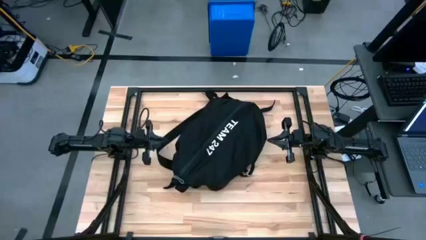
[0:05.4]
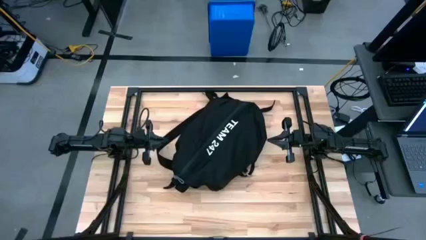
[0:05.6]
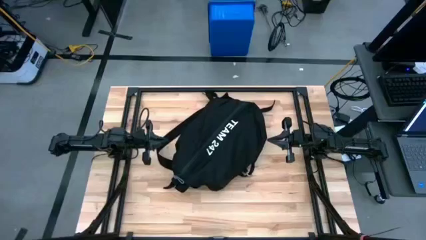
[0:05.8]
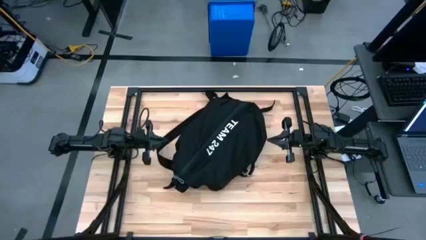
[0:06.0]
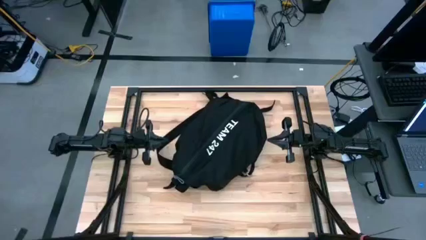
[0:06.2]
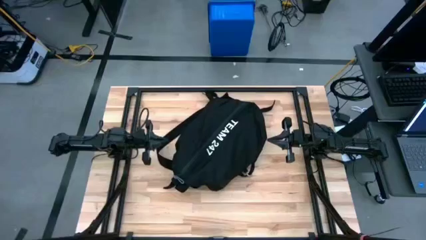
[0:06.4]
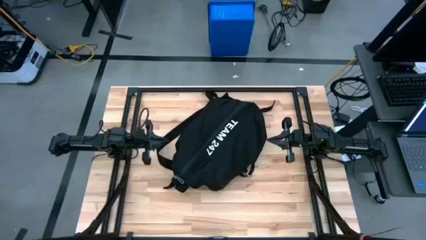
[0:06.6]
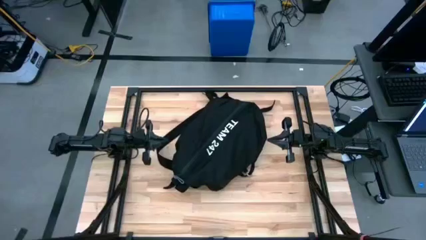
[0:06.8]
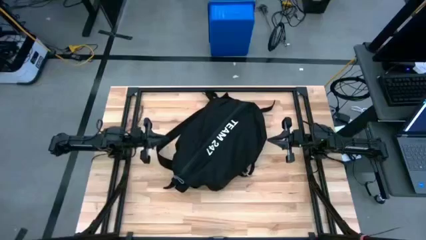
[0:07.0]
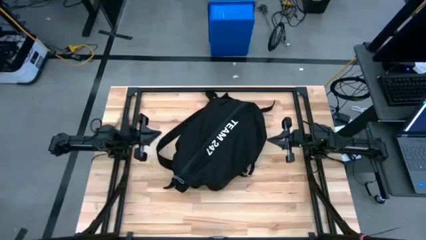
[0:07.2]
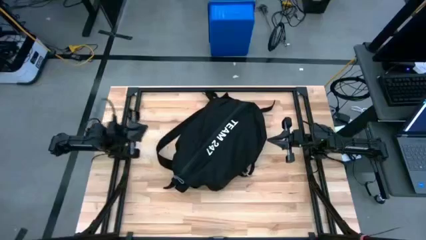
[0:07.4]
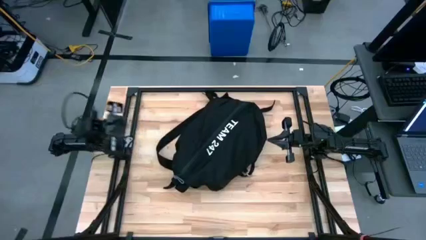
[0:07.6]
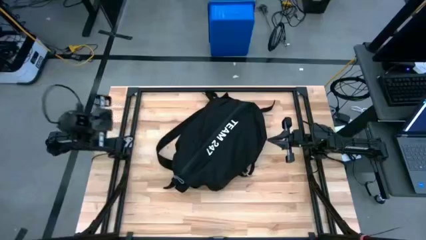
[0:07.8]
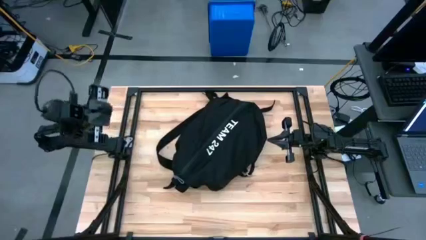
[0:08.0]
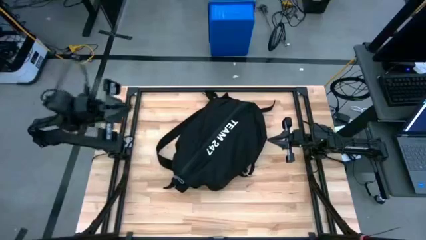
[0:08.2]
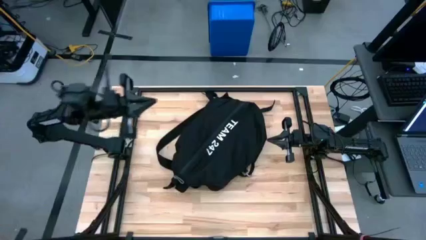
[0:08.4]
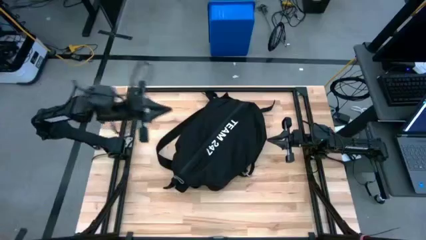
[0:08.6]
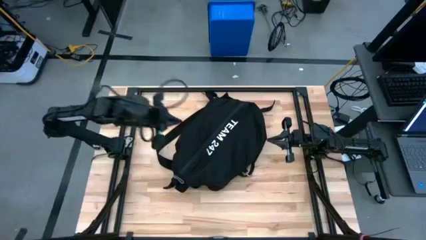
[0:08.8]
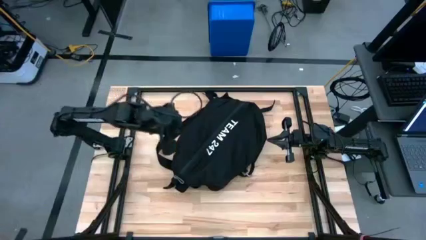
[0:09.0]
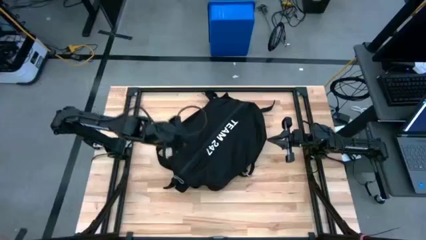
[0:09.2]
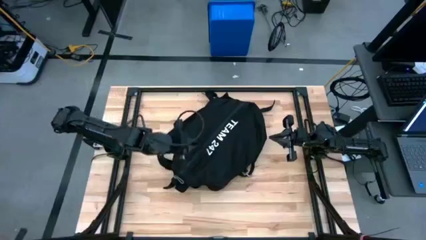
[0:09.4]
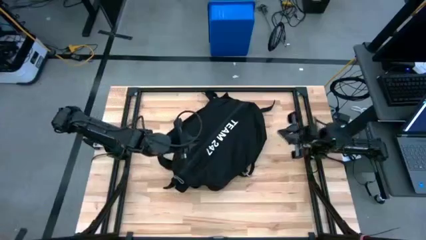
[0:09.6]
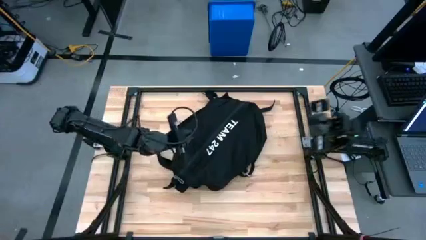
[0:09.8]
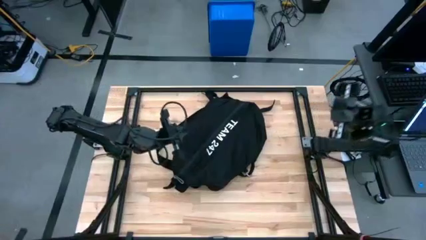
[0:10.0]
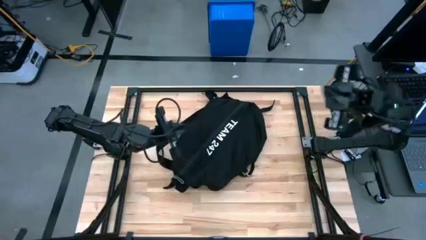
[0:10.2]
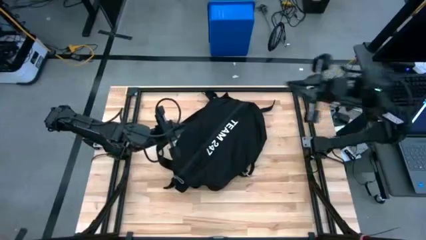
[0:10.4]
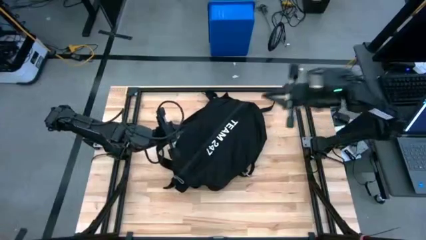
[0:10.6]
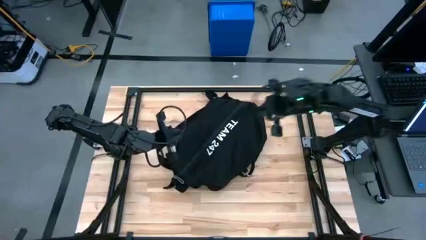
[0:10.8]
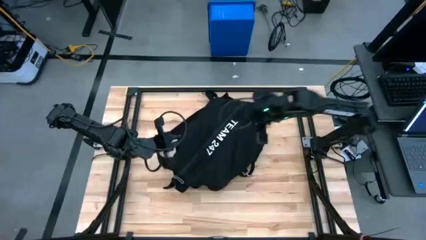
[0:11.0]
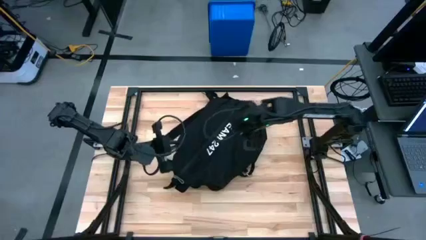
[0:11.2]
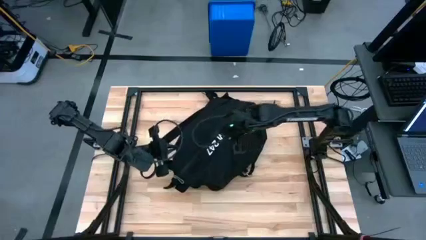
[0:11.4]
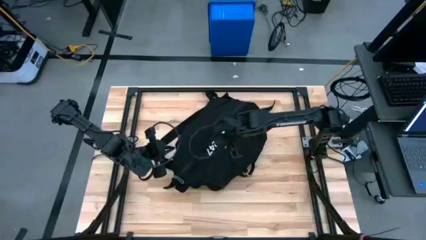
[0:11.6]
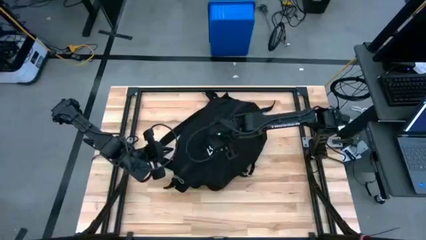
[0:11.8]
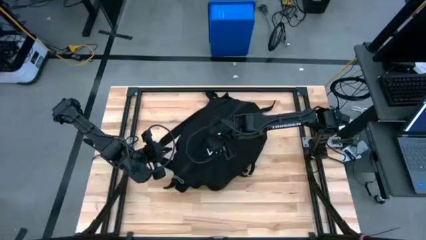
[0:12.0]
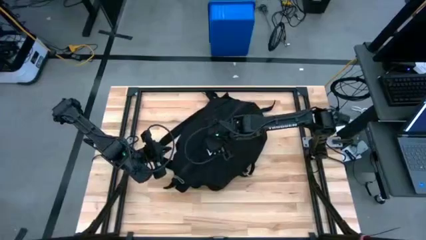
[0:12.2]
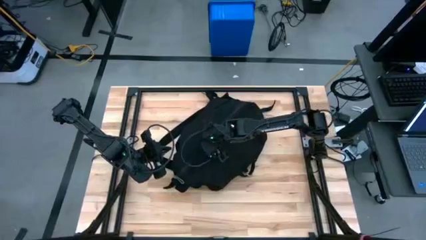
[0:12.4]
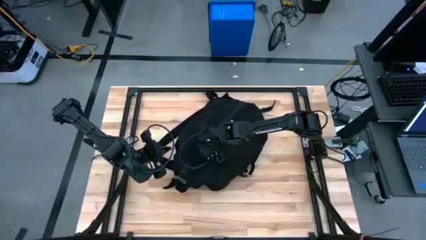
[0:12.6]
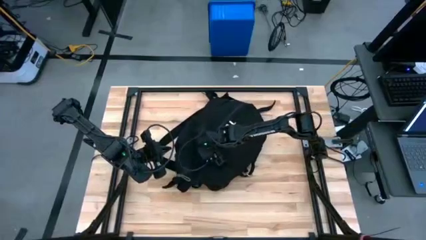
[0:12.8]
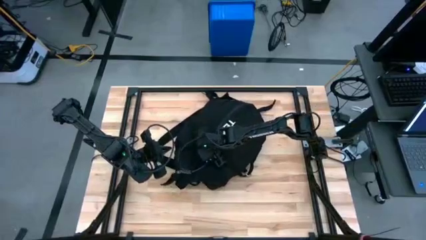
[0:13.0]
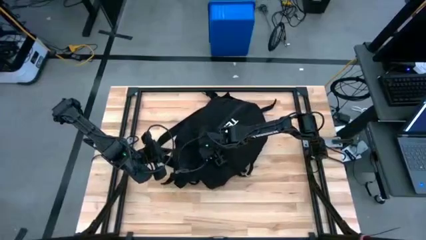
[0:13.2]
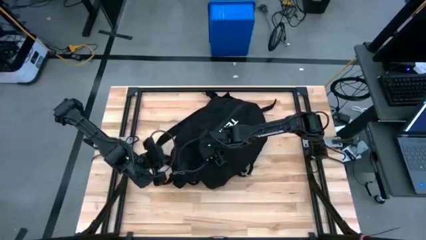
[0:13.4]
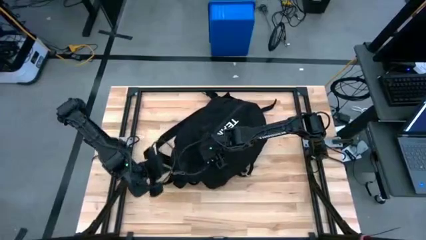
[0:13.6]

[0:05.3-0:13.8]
Task: Unpack backpack
Open the black backpack

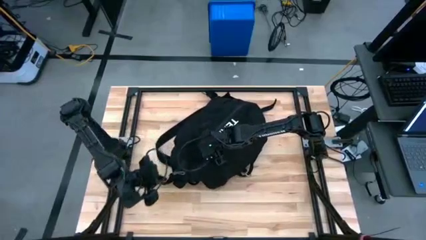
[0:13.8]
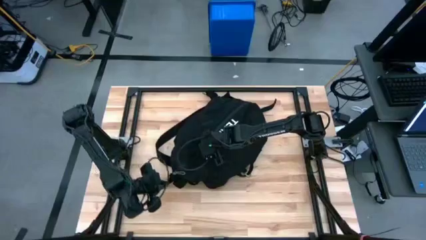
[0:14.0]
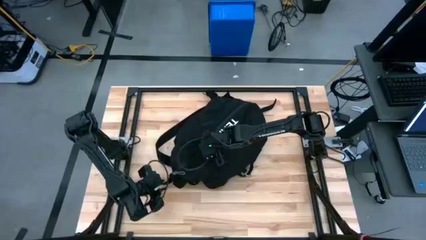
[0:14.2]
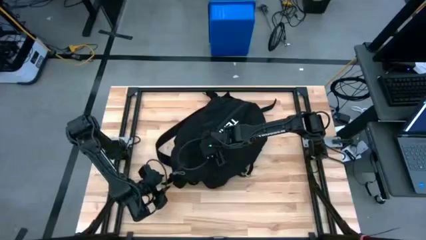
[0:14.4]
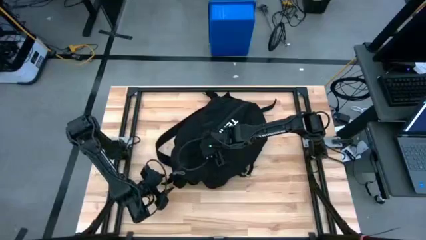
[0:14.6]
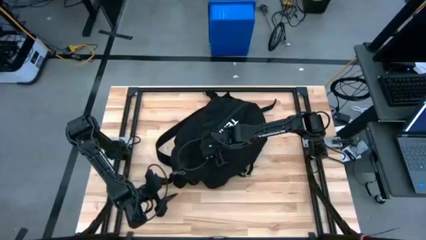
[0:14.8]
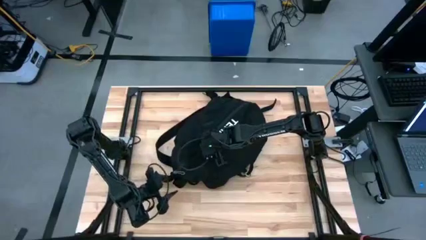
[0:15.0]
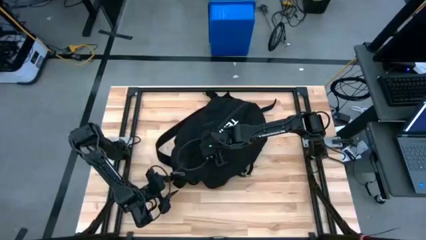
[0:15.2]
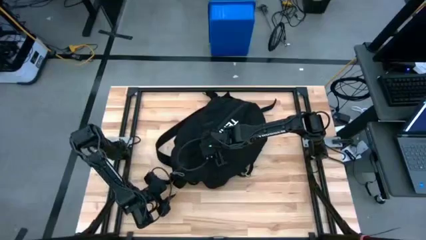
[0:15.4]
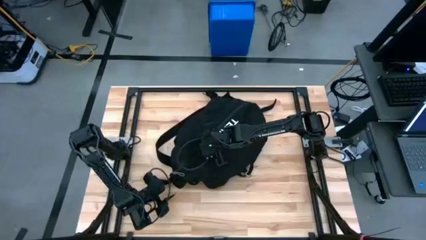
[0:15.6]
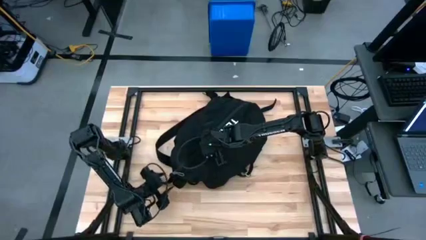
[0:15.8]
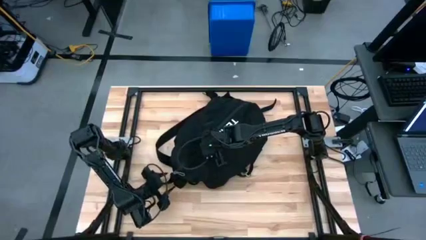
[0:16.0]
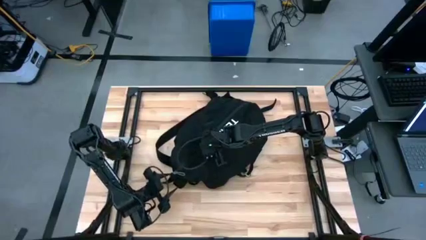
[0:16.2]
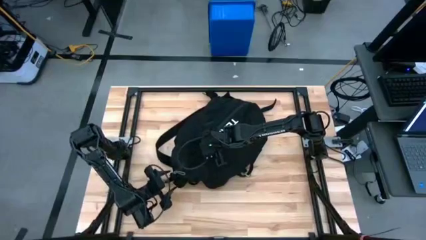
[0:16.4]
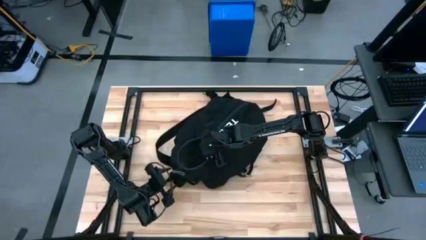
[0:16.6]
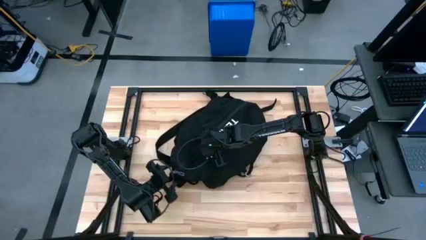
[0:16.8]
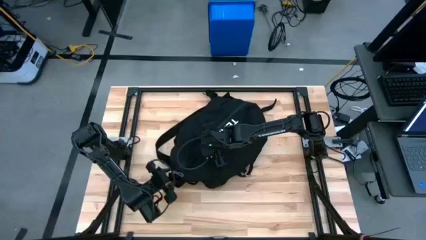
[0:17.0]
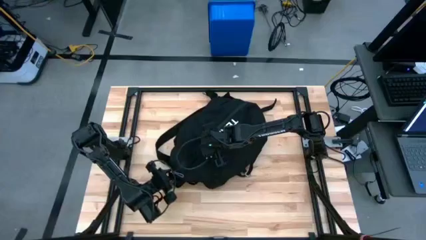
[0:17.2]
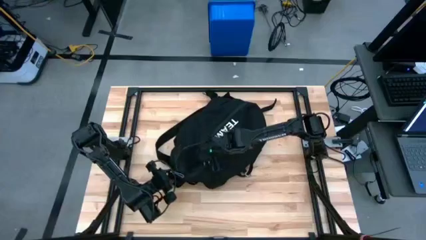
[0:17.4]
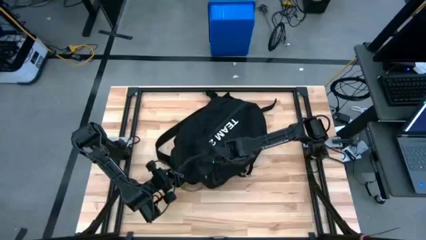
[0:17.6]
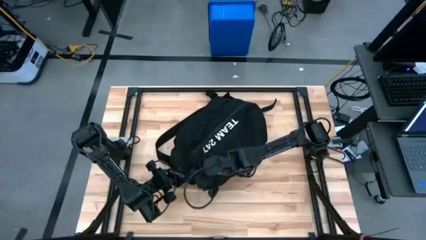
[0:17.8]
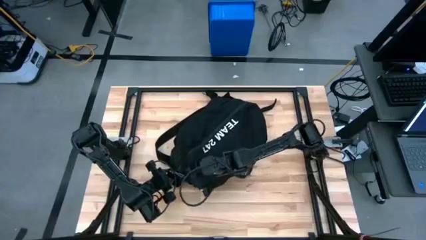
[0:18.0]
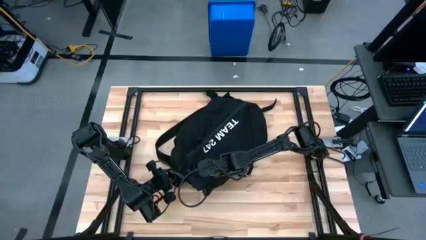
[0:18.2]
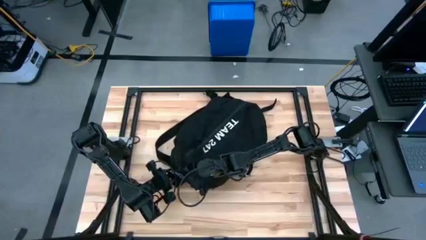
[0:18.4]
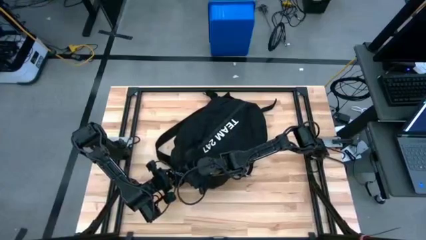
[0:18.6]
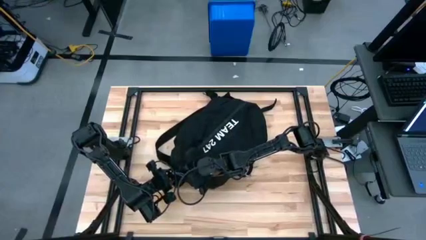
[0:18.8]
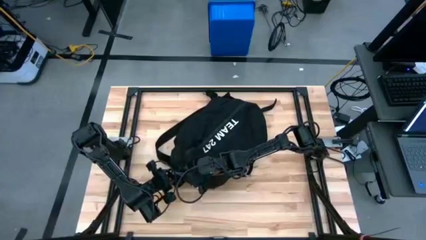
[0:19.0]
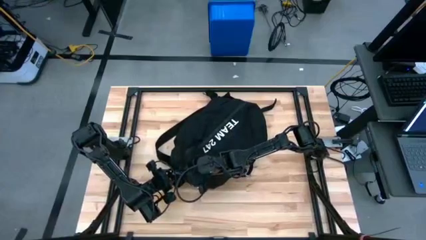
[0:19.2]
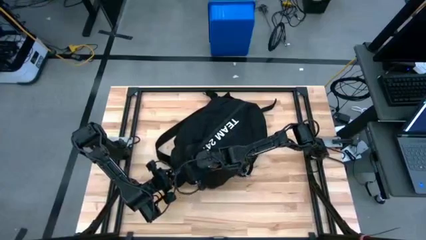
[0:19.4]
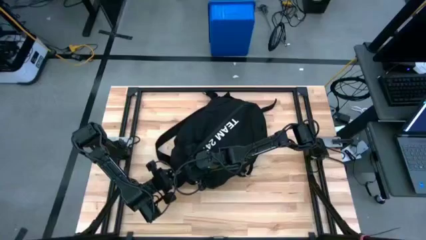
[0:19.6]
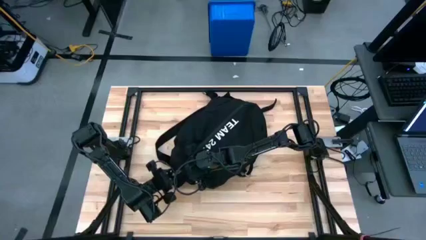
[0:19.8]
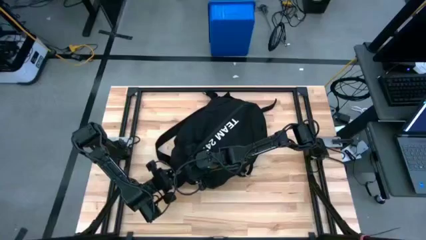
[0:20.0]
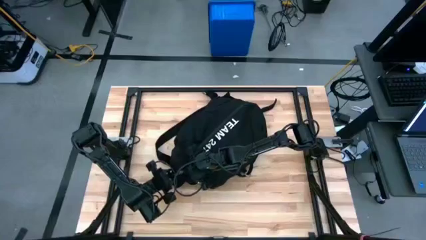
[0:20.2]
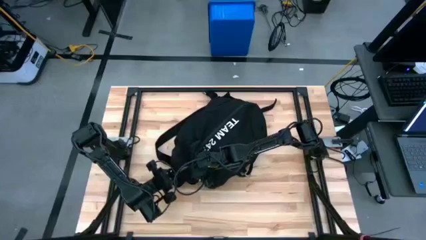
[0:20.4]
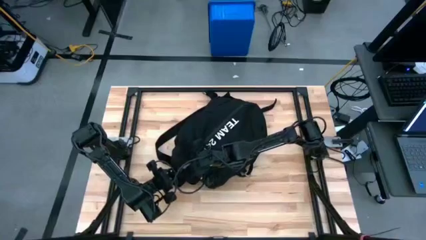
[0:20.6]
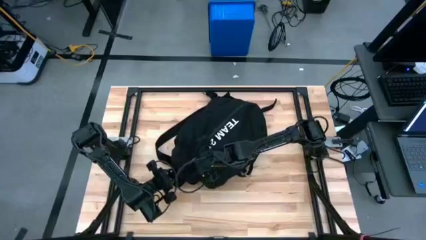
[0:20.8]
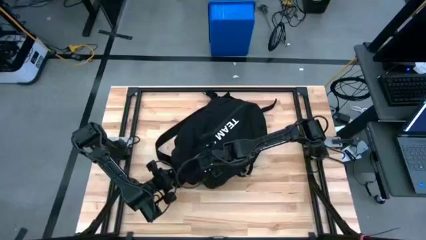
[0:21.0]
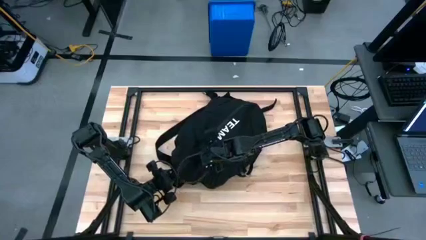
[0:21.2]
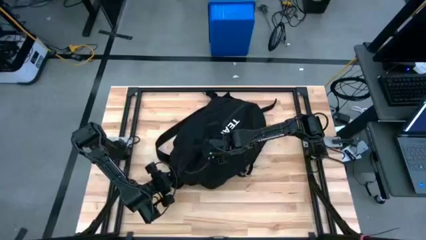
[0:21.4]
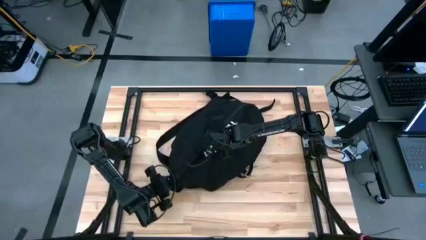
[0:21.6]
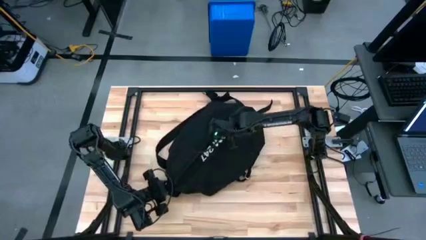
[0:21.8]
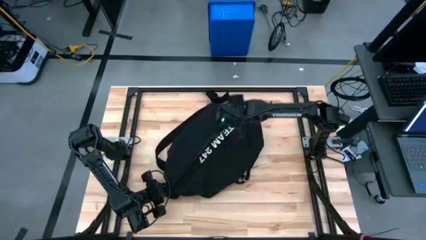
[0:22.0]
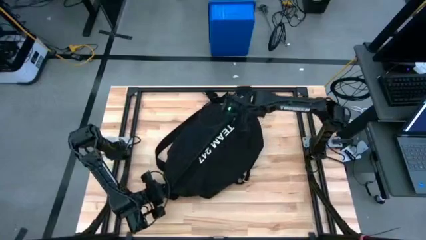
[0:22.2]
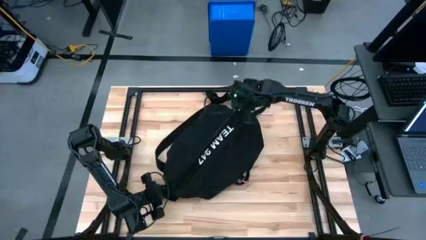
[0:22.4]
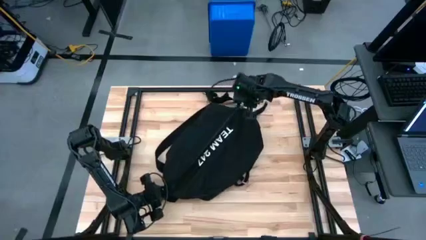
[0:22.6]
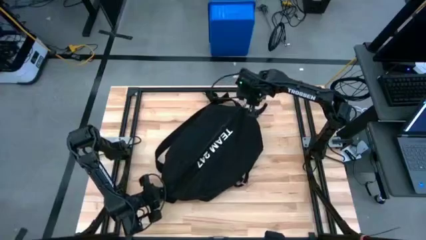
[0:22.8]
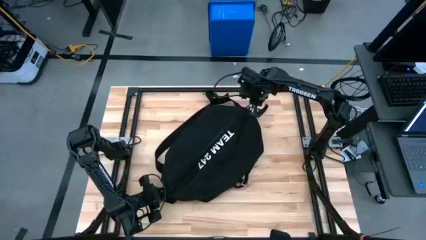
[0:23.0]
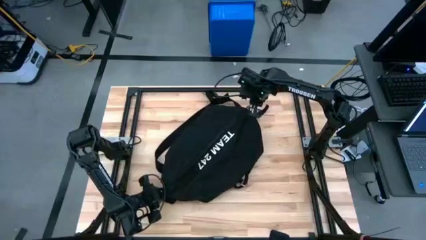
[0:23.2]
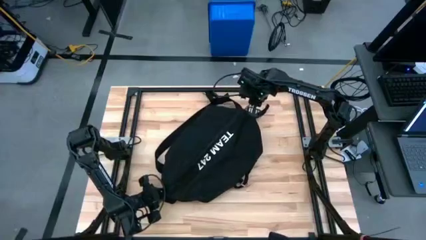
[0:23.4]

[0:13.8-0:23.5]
Open the black backpack
